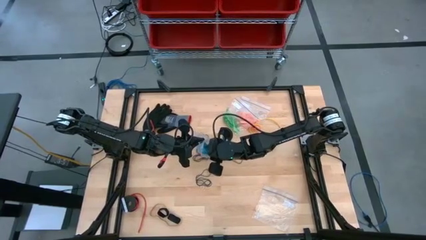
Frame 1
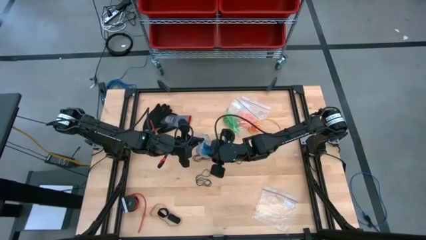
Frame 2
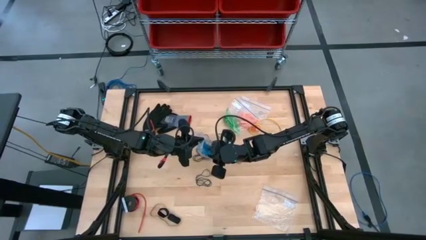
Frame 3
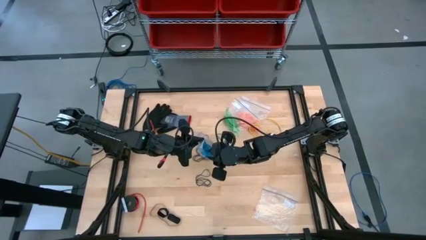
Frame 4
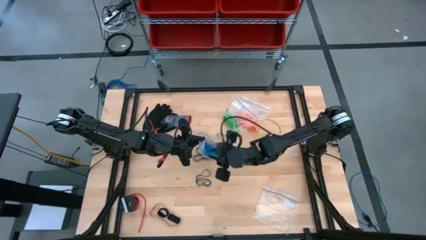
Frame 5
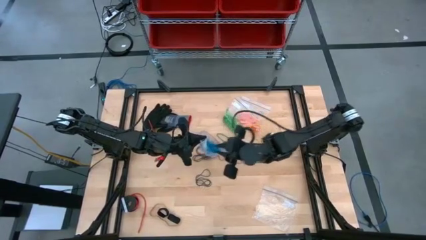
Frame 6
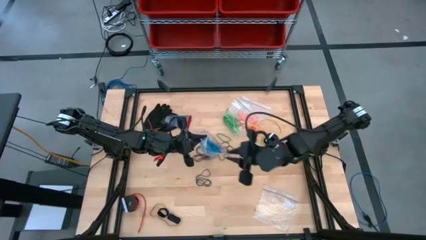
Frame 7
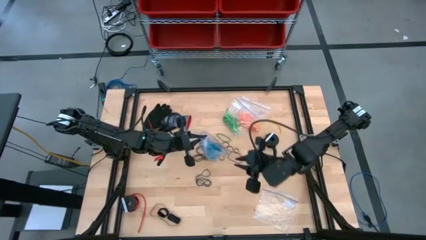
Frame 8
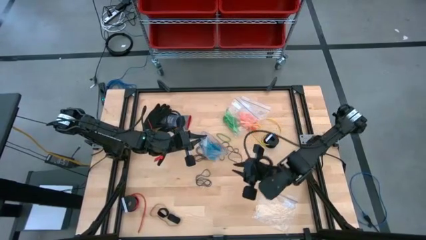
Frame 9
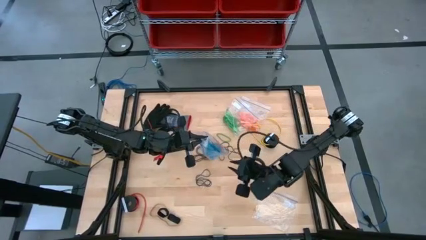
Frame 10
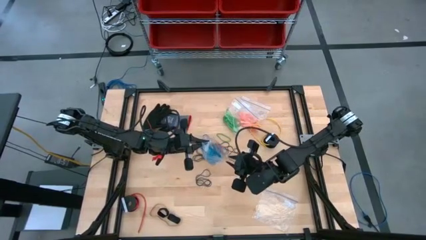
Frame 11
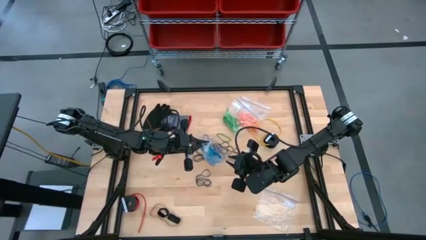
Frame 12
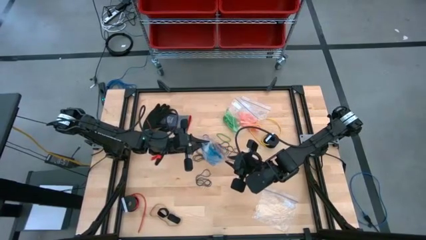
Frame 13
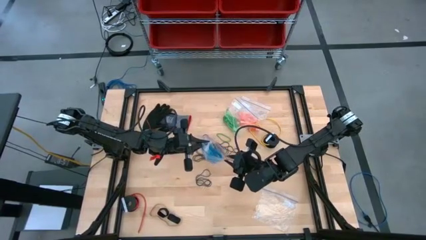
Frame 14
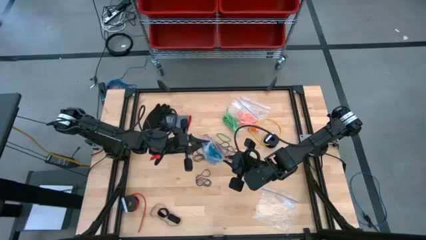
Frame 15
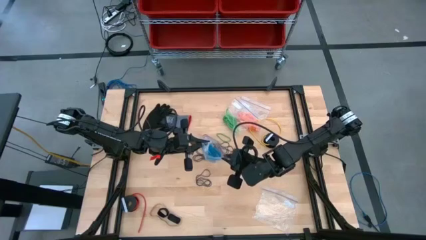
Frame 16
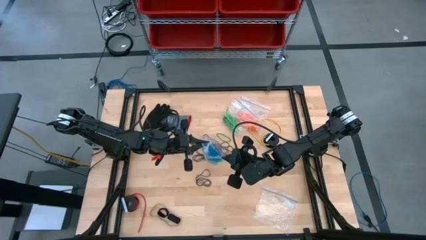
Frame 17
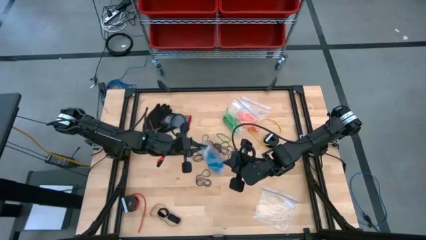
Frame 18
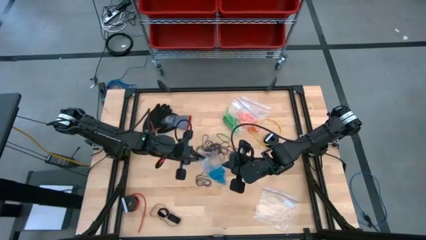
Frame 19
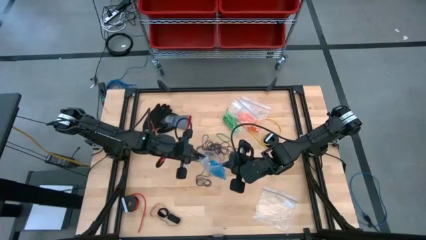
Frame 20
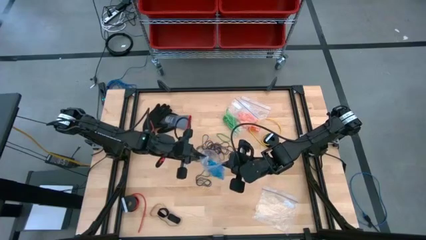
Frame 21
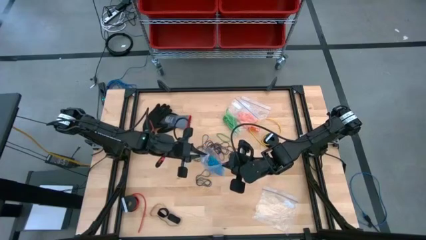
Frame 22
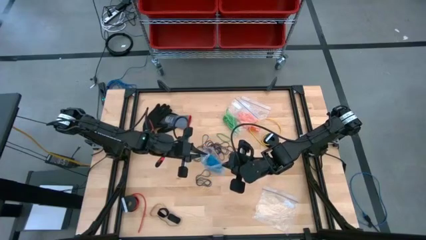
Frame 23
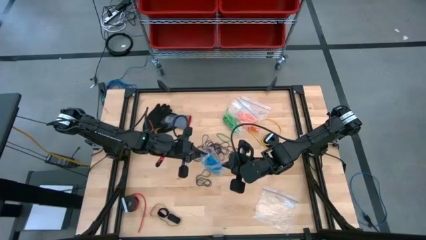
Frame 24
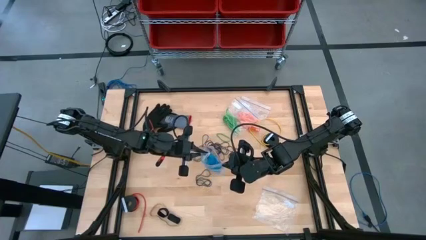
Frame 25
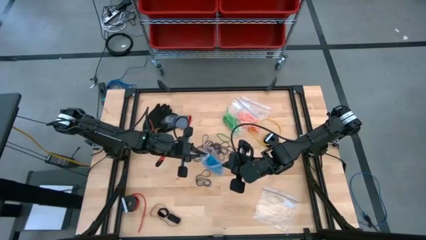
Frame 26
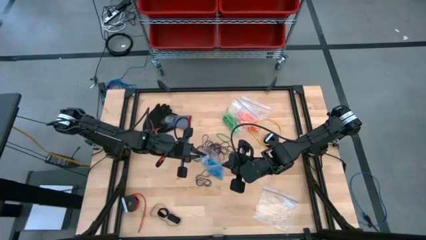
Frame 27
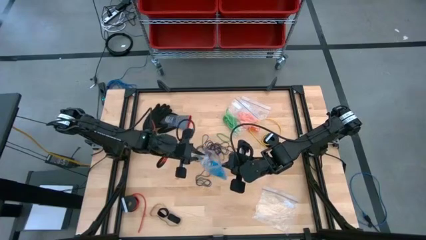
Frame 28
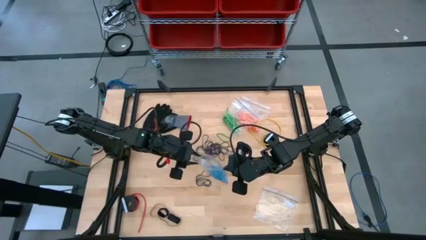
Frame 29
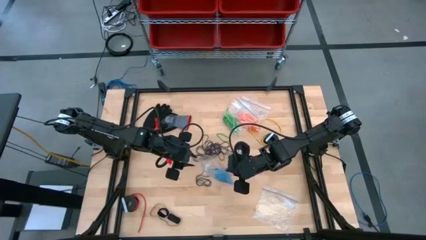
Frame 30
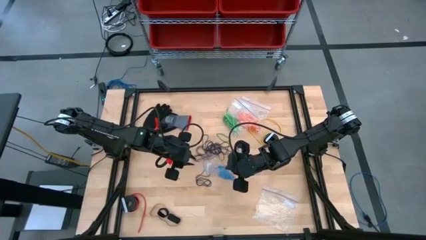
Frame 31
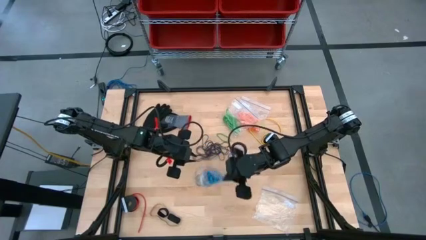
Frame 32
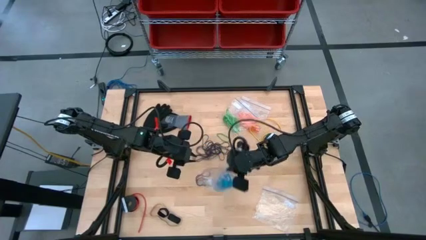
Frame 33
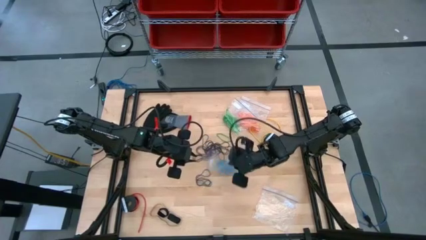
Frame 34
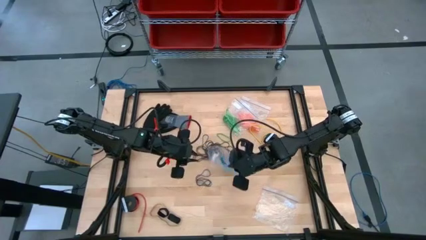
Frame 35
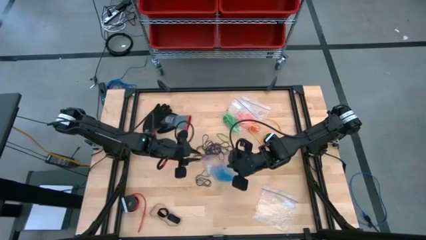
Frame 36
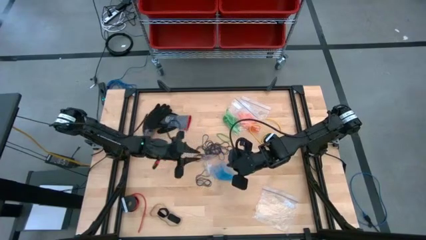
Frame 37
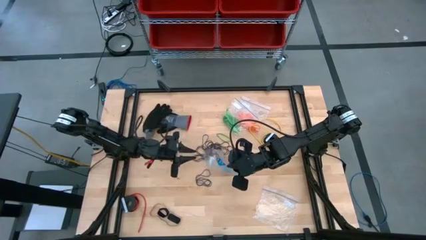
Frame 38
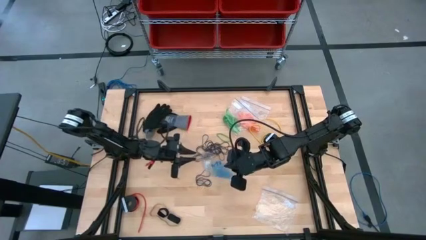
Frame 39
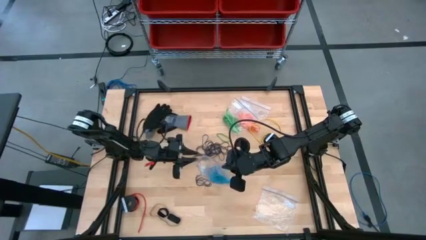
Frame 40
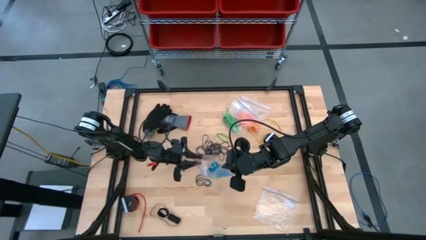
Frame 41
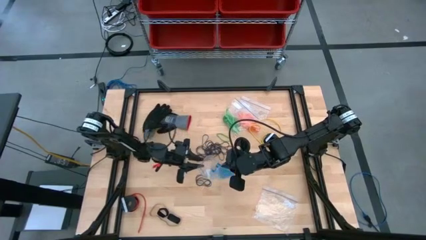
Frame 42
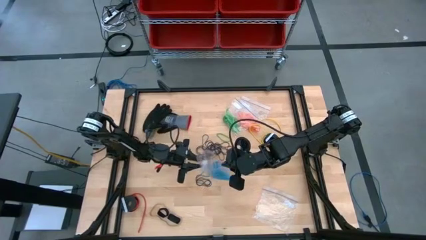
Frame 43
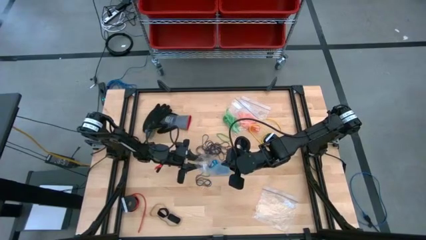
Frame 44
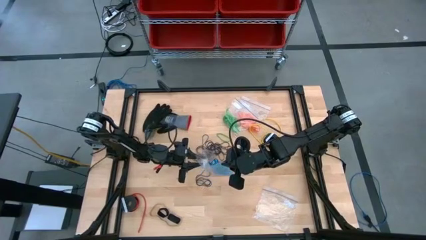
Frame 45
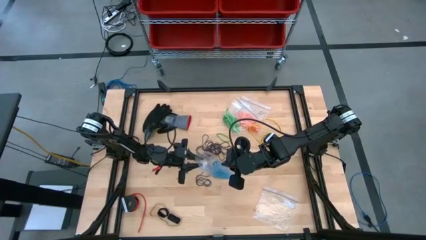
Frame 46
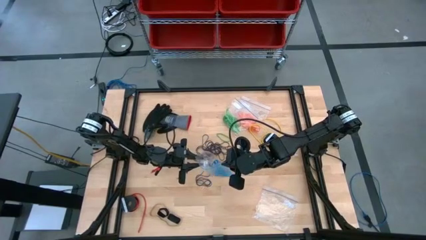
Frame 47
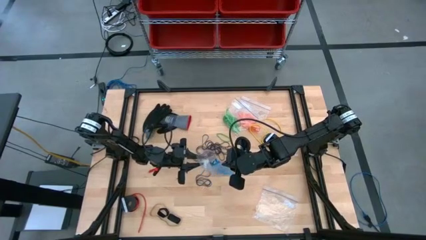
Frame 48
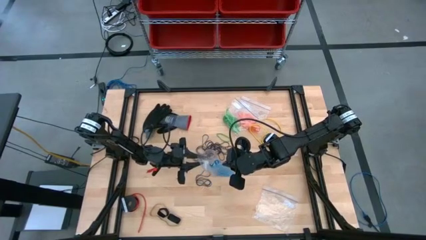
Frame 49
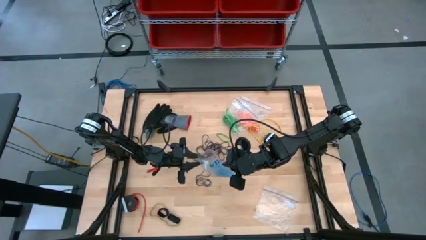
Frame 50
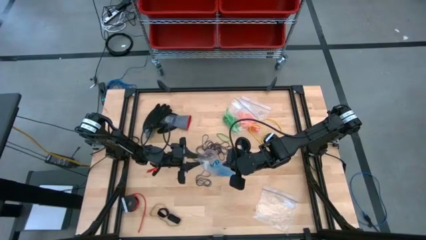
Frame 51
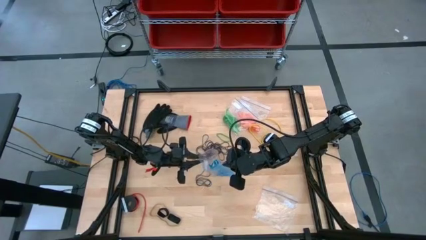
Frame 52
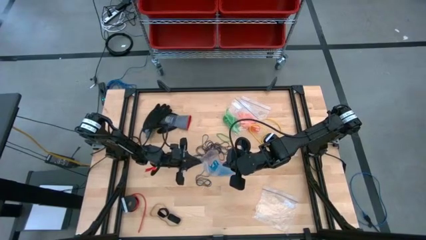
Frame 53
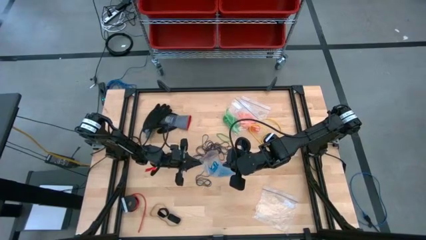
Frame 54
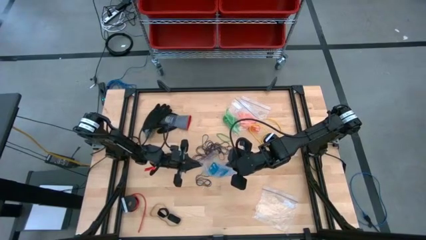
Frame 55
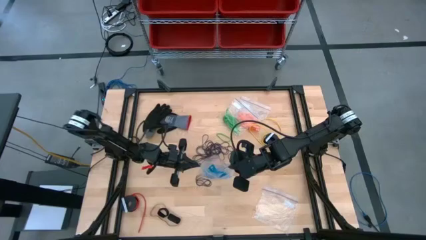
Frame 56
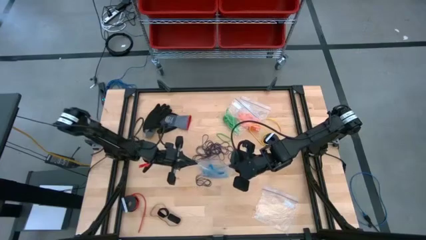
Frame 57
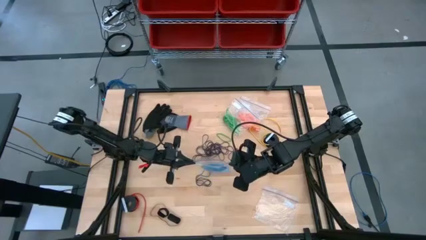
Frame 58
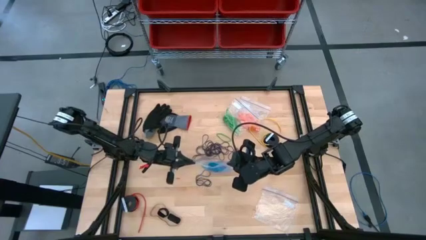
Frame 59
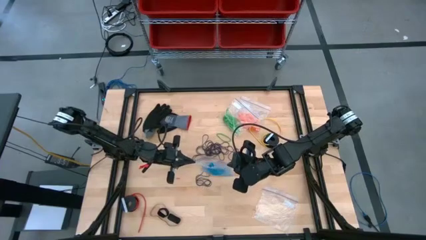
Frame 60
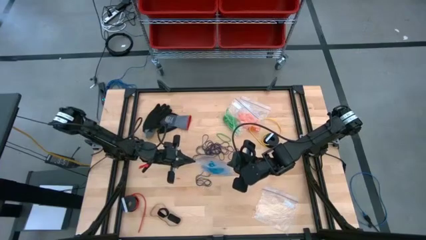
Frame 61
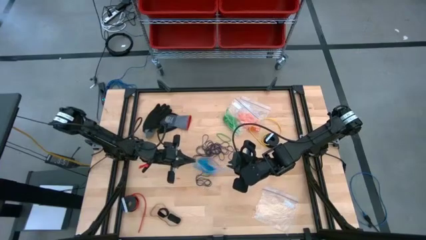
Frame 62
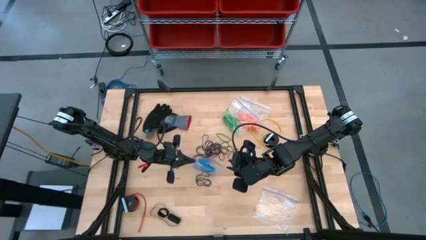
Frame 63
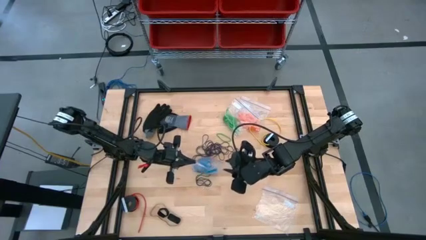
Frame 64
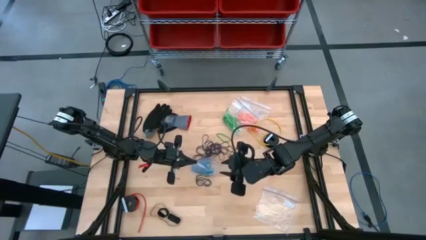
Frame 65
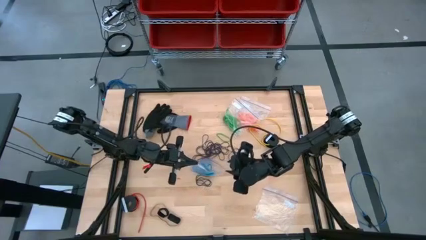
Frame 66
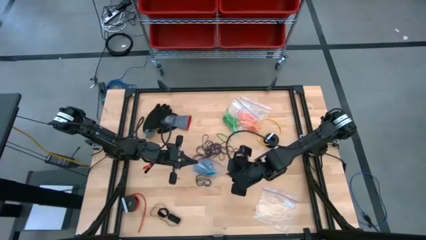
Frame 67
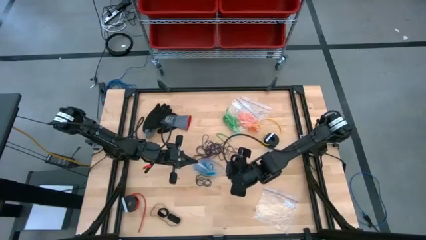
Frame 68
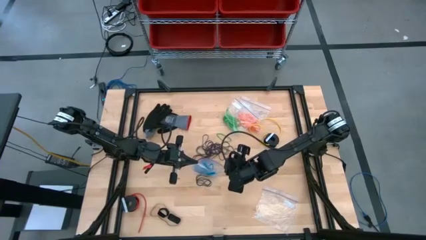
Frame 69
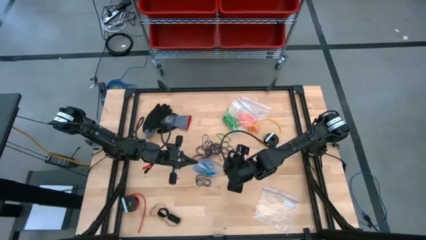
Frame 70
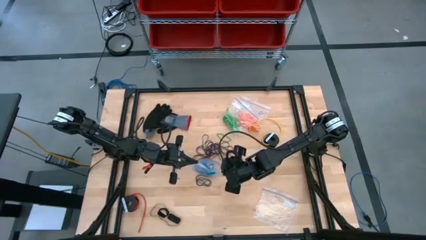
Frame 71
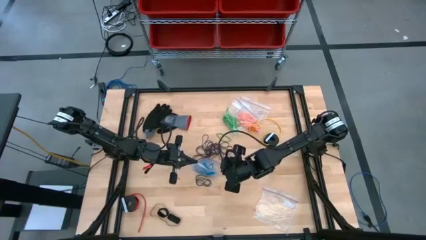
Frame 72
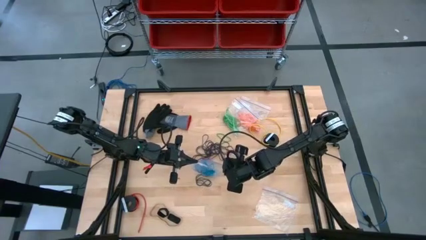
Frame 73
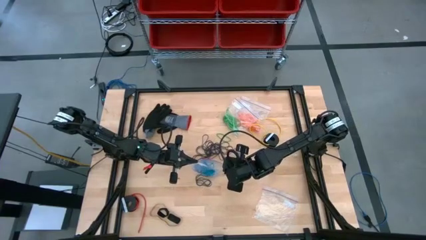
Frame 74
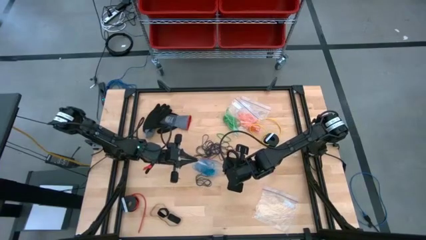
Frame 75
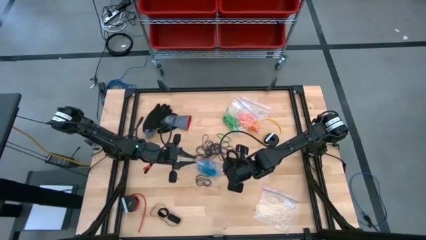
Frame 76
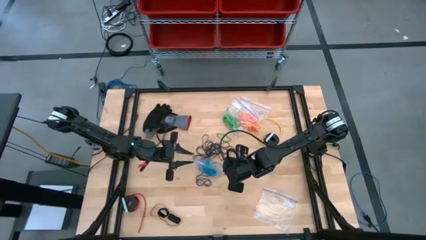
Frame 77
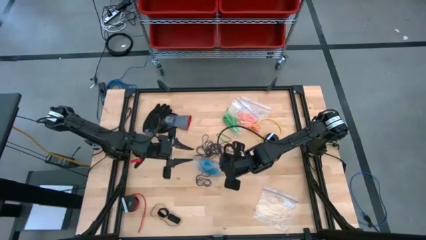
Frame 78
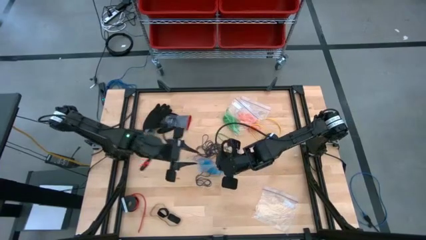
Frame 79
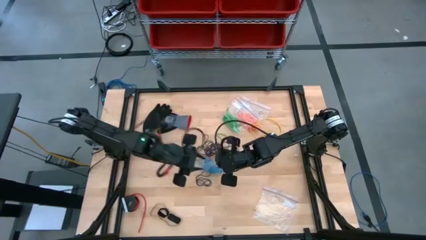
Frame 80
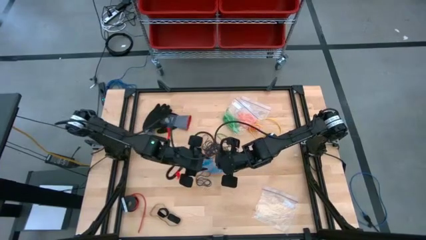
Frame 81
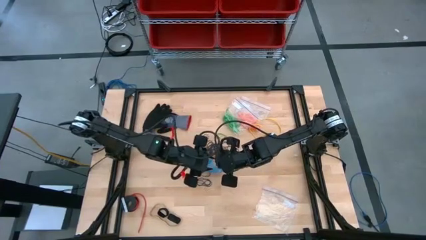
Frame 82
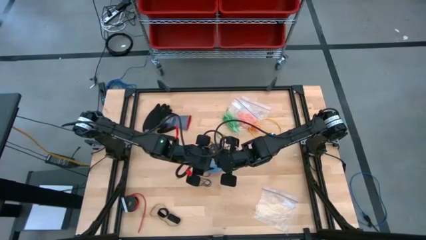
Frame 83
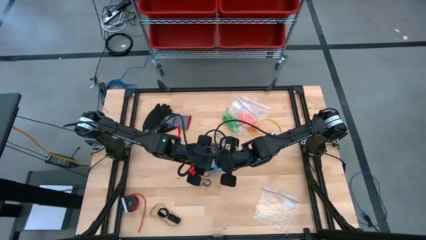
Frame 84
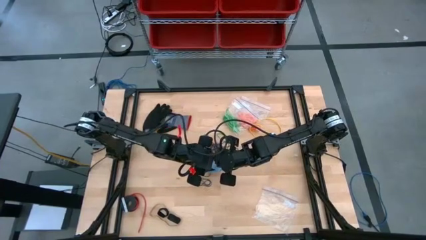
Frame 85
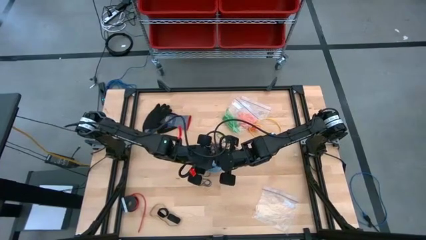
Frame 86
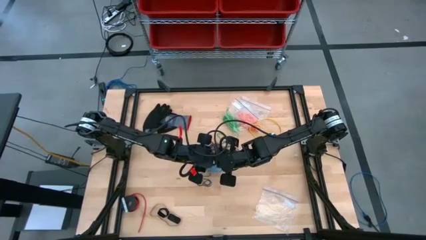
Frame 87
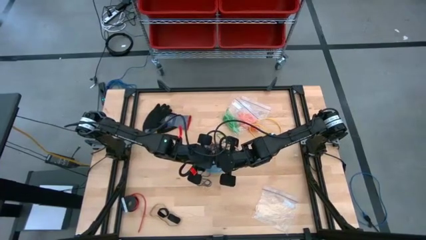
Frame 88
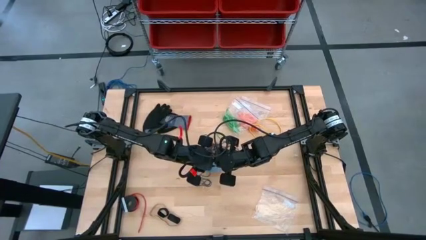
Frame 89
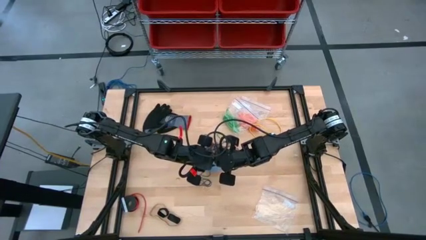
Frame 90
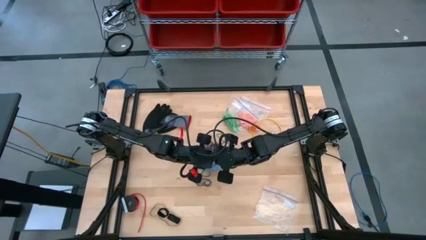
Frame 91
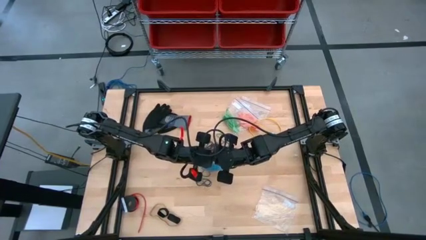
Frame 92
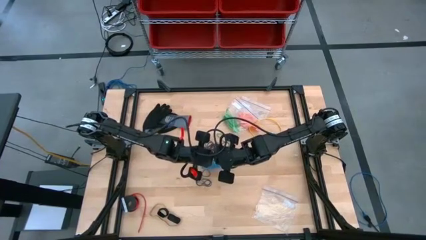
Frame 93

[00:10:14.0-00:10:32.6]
Task: Sort rubber bands
Close the transparent zip bag
